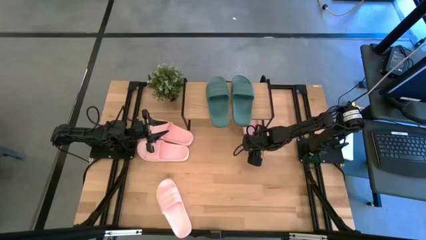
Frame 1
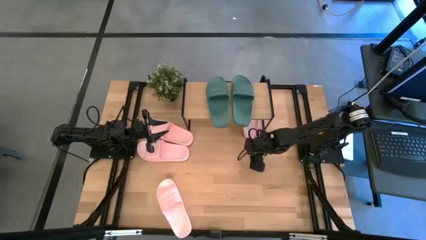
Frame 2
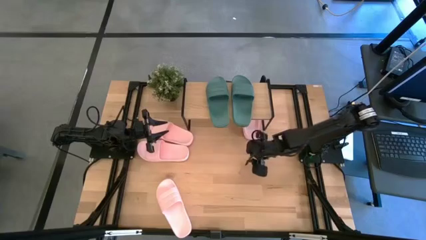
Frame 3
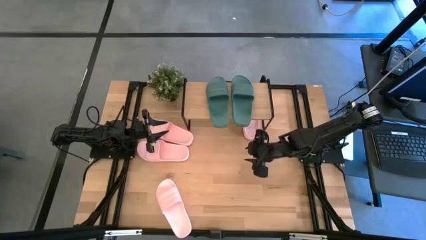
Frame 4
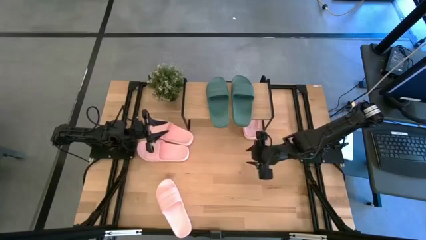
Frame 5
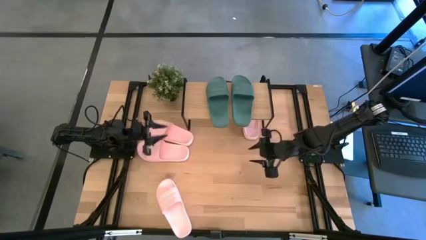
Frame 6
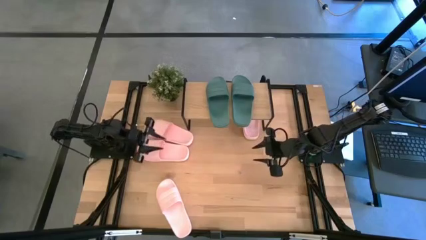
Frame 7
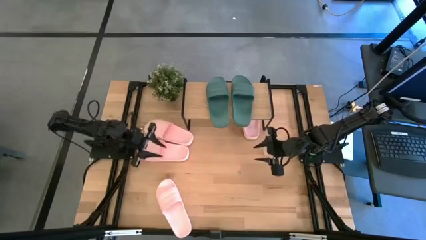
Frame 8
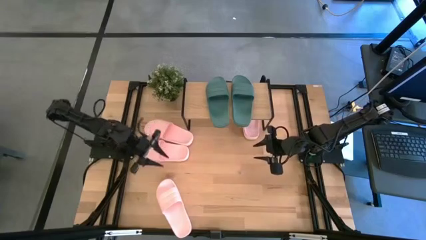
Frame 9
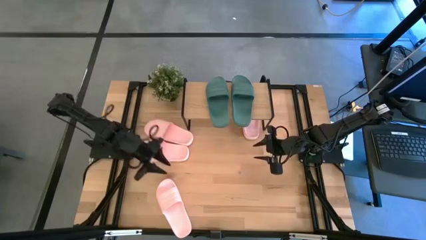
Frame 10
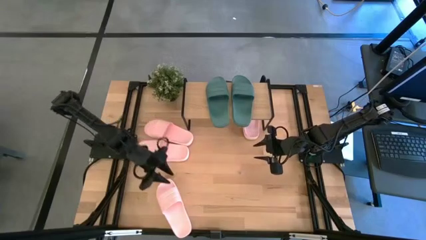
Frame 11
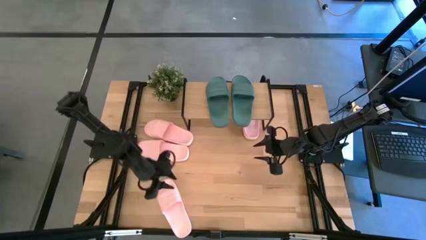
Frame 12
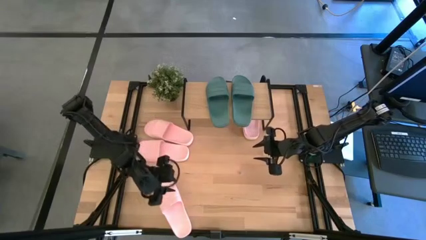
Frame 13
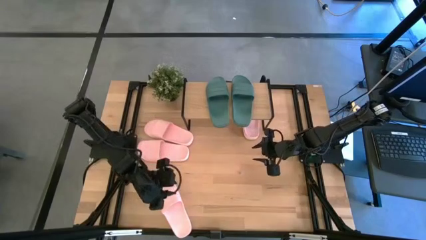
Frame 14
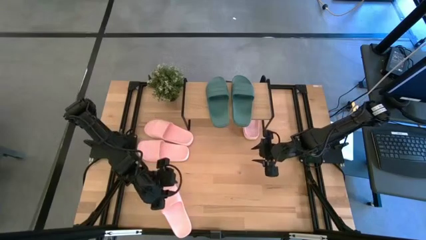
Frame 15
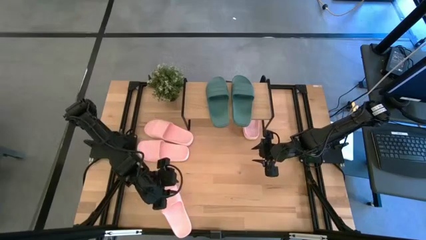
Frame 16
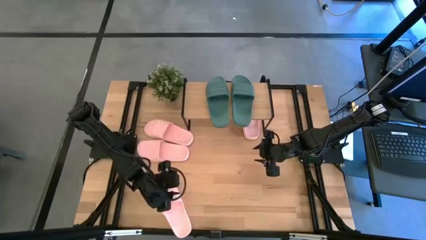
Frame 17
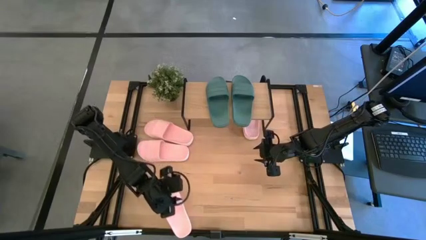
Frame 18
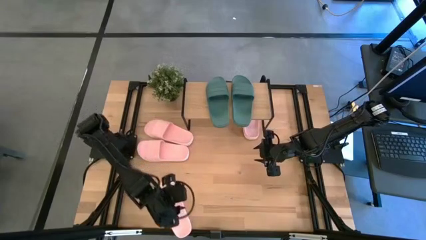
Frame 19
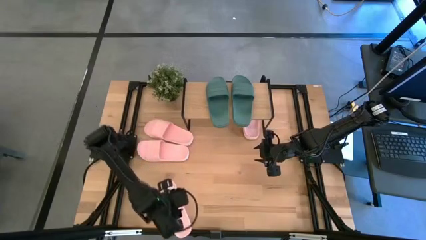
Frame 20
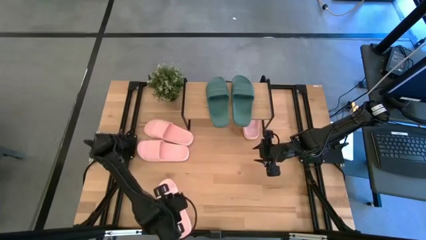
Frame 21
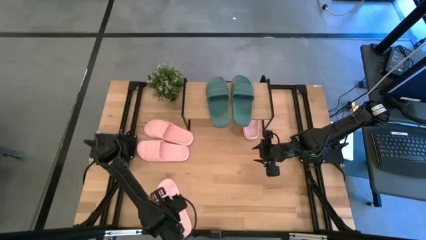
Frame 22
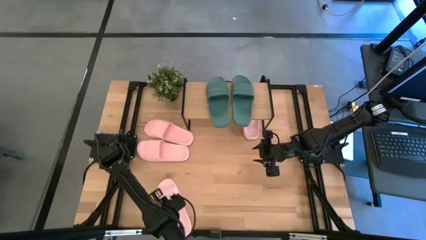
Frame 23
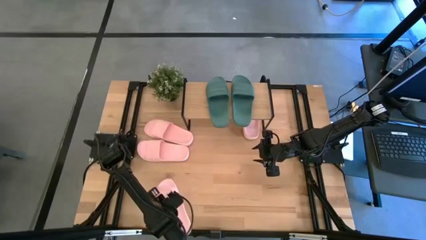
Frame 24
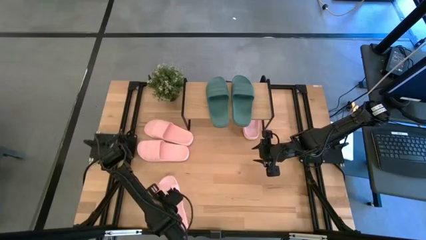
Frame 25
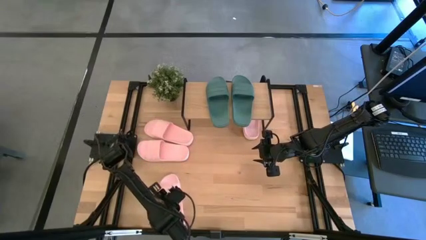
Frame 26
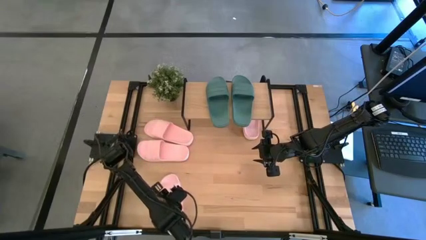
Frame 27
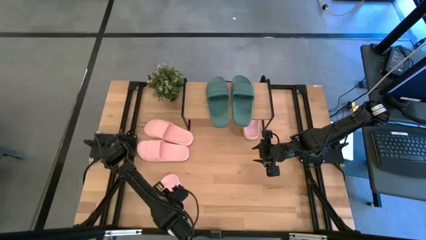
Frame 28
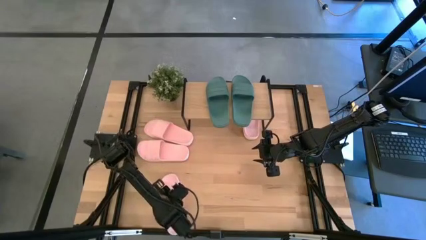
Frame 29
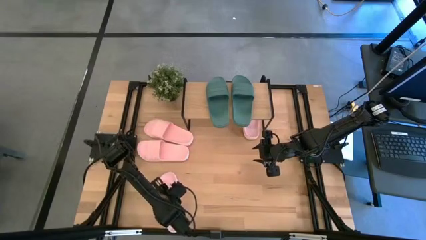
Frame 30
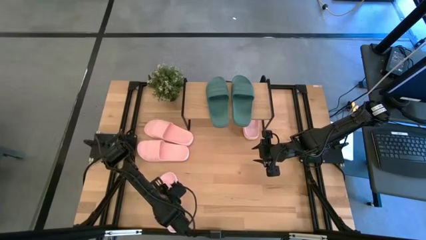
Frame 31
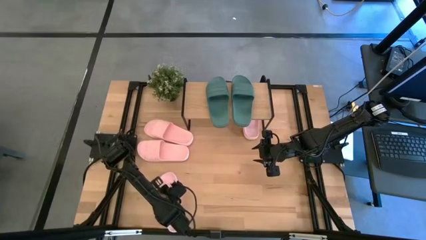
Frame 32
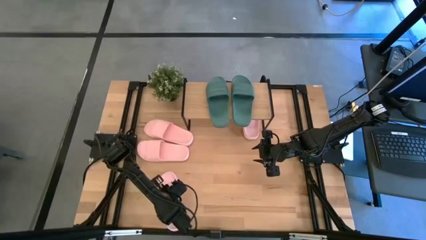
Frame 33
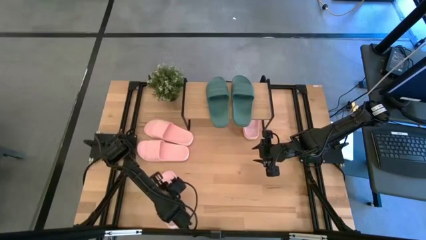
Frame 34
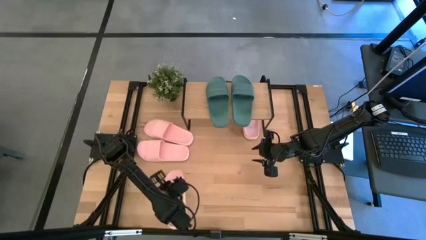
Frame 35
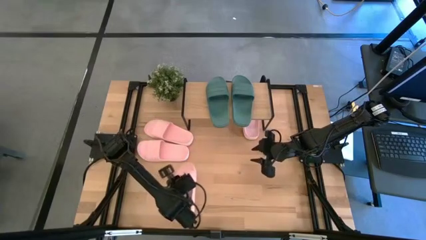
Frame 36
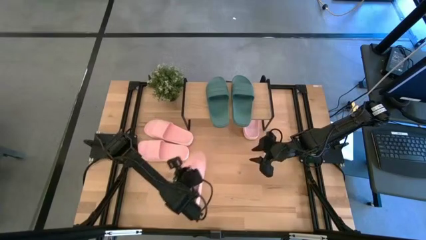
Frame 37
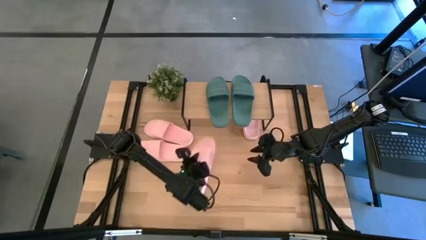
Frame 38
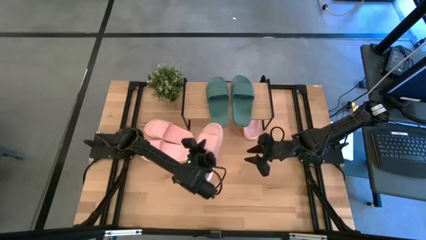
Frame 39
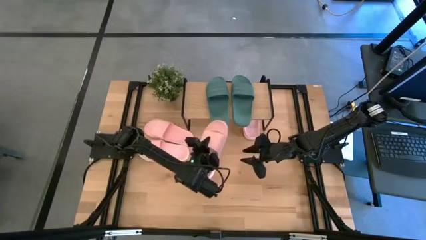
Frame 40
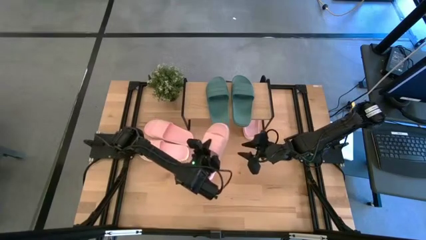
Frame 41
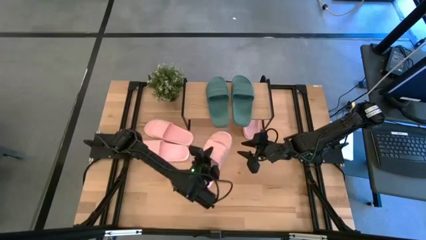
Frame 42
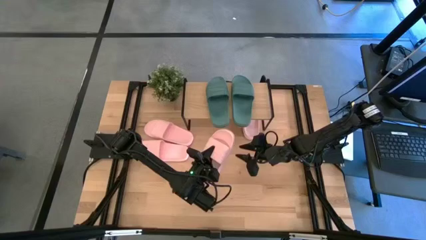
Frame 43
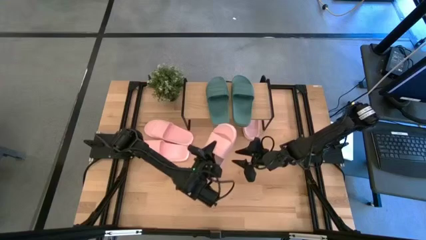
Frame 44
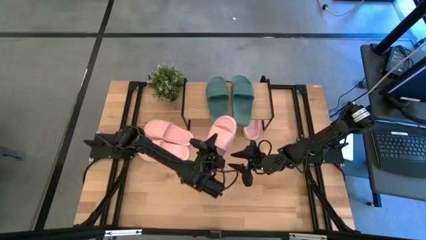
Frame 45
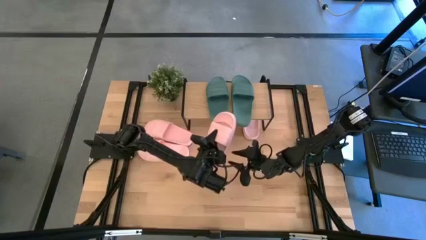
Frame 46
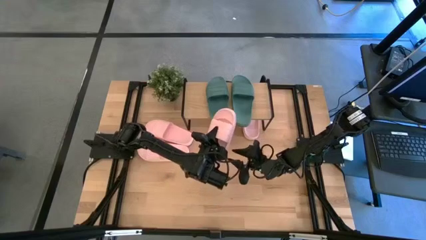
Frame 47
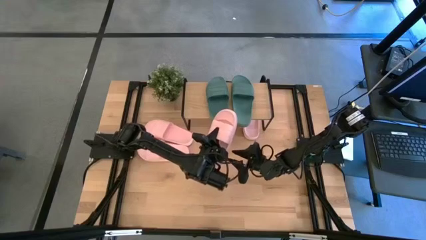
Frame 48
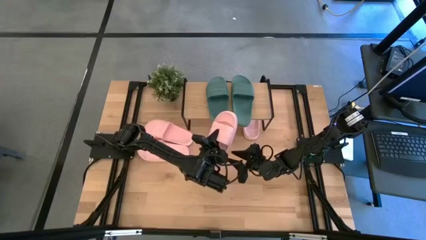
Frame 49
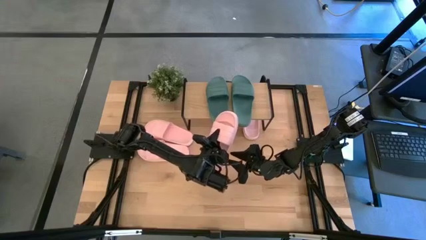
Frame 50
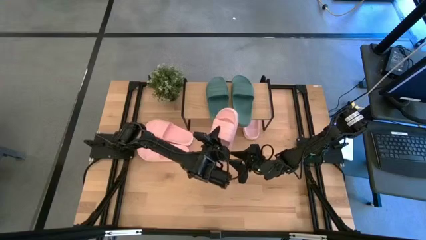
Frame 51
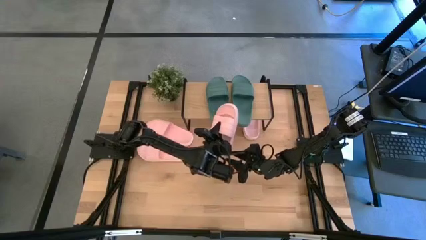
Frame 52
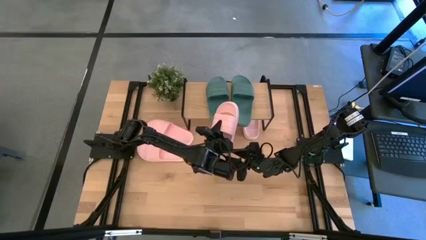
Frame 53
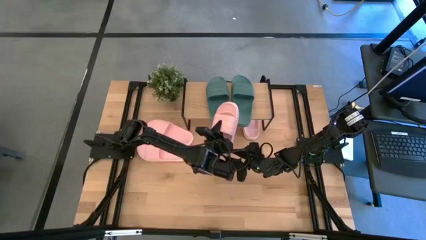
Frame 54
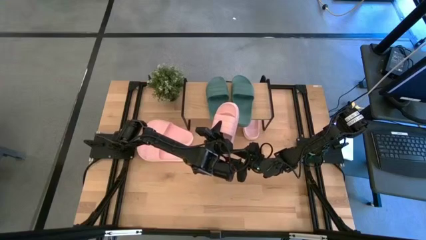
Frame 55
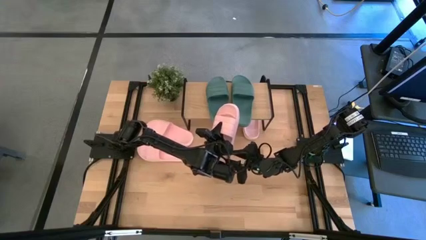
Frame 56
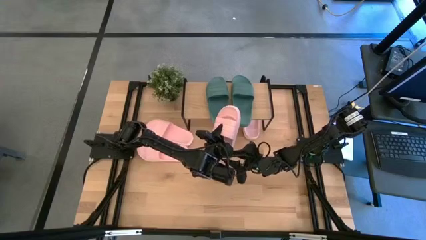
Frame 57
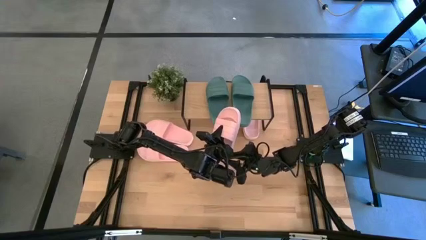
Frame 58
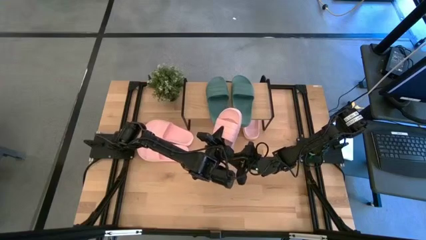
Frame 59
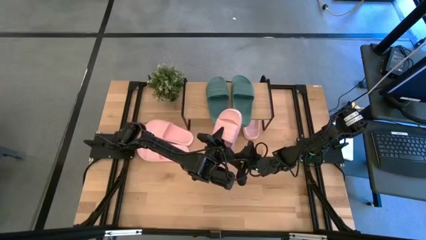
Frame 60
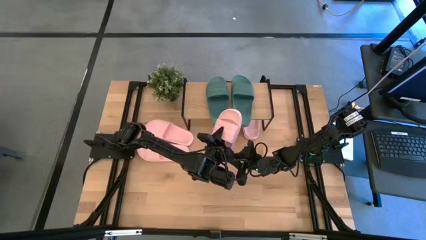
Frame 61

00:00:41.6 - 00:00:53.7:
Task: Pick and place slides into the shelf
Put the pink slipper under the shelf
